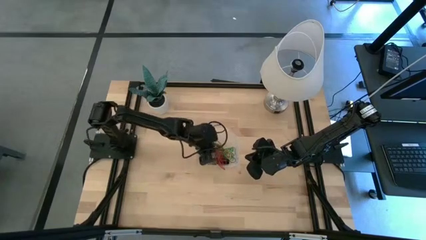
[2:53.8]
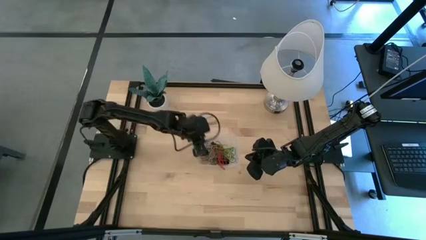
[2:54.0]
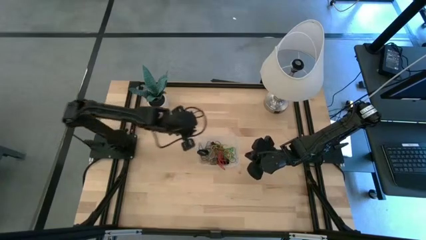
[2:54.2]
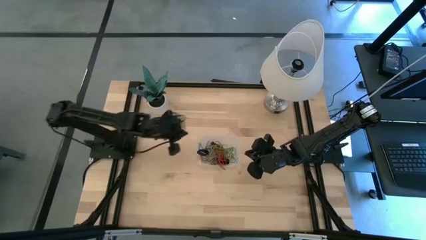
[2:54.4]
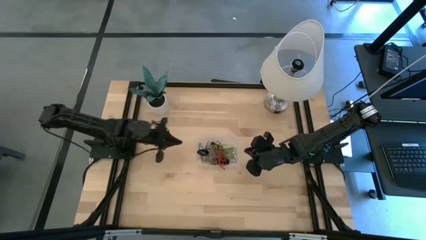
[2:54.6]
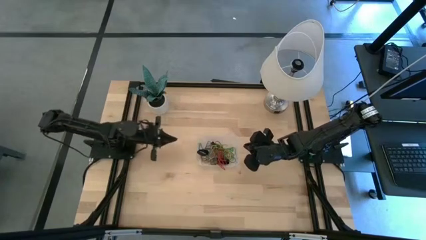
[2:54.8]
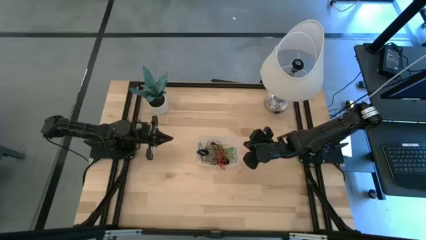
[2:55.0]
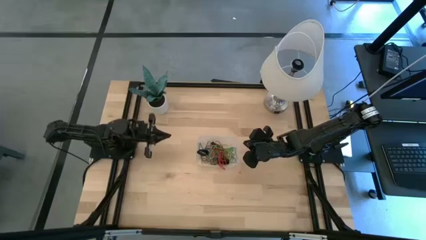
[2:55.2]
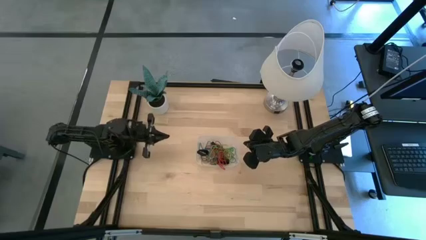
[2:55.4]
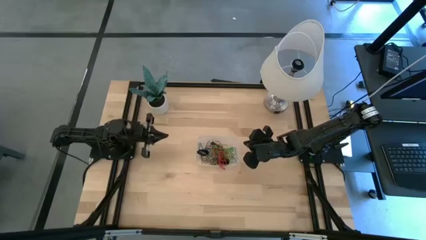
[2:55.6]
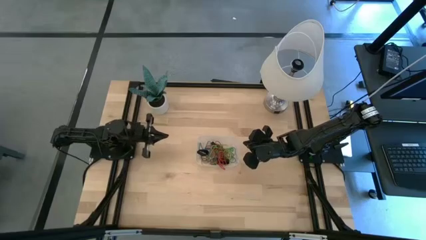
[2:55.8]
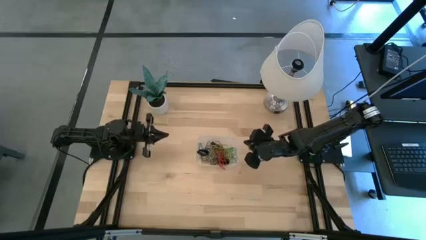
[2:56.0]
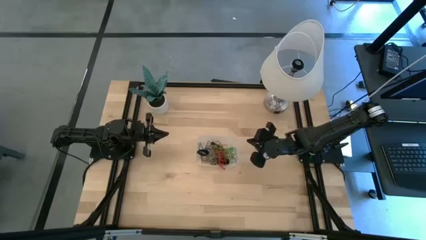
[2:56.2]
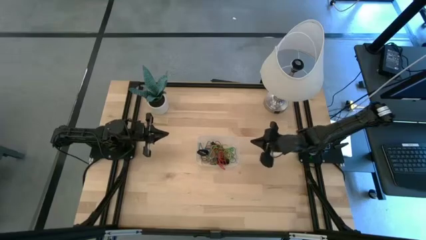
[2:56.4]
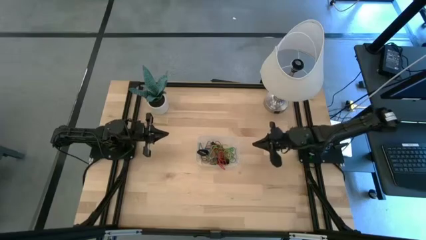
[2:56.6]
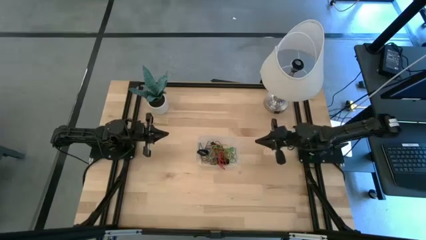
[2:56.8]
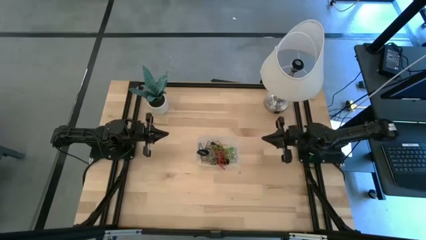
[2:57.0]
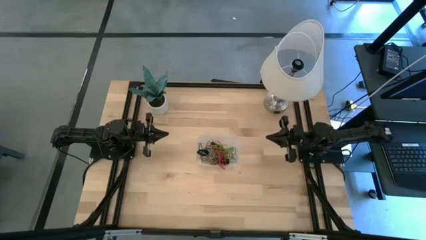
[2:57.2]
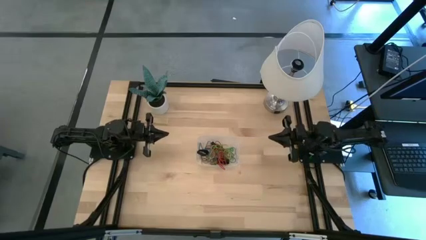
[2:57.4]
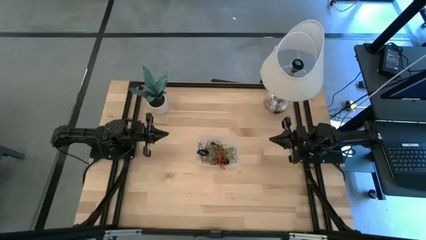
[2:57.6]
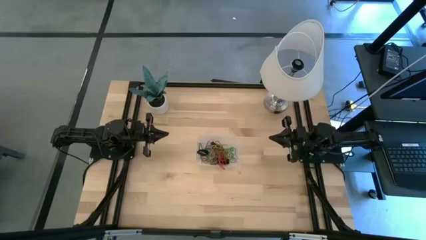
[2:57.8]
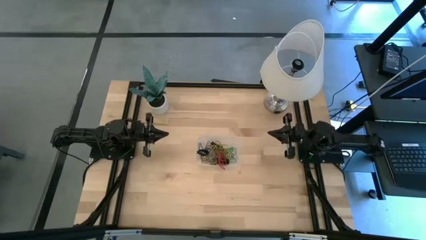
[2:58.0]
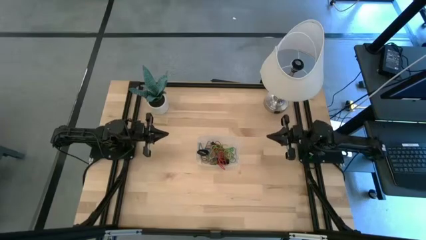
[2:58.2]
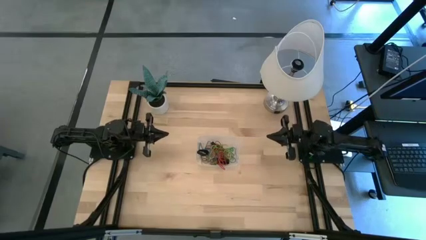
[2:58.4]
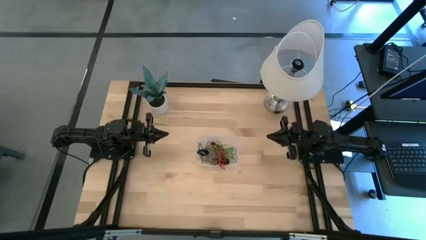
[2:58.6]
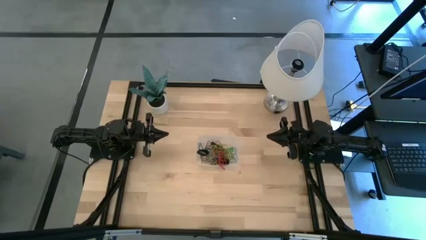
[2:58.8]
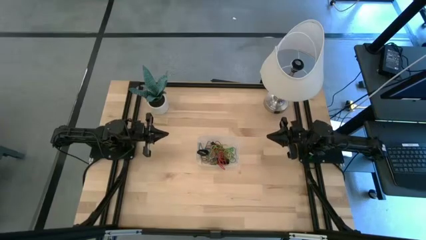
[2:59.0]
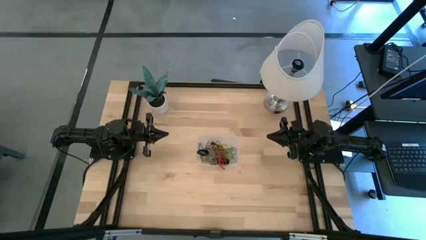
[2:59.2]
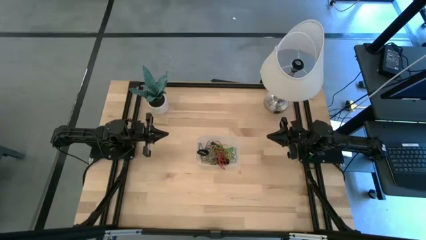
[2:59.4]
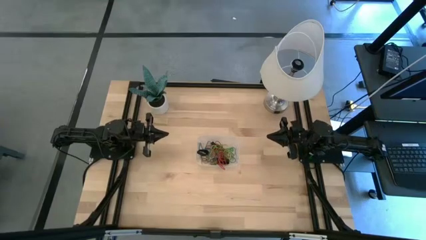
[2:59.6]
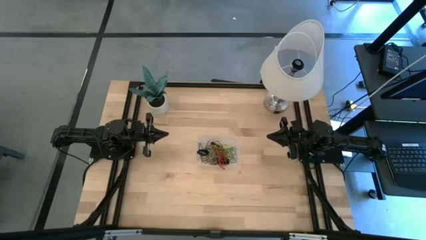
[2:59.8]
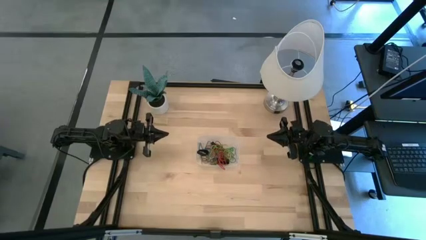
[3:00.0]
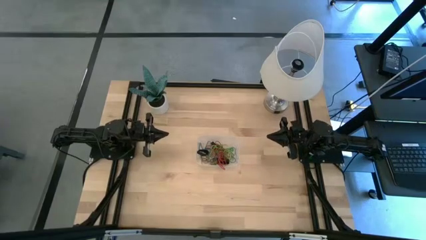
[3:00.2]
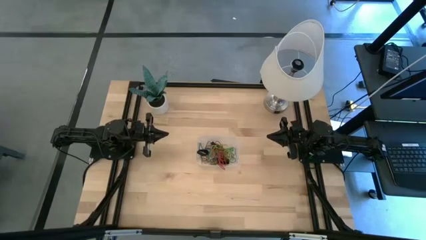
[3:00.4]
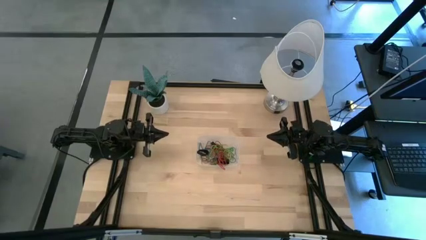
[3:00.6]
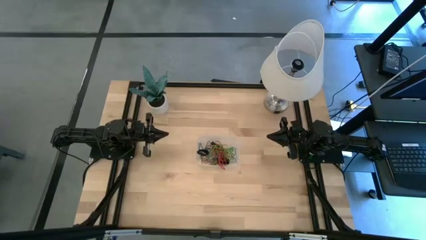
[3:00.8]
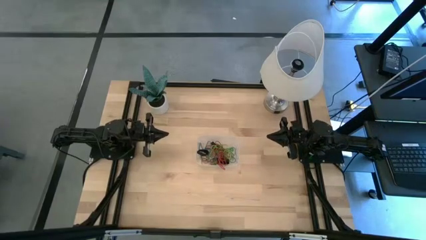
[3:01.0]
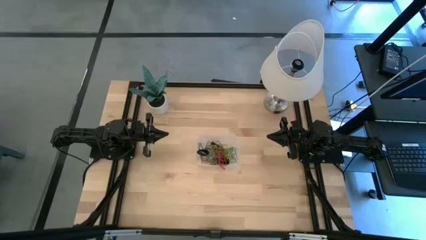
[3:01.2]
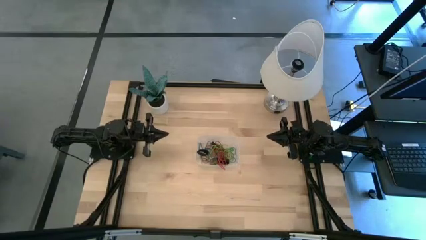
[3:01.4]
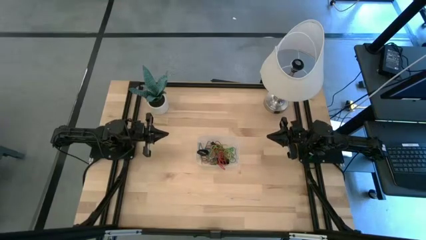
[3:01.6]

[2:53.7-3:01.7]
Task: Pick and place rubber bands into bin
Return to Home Position

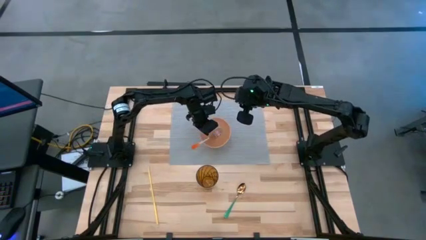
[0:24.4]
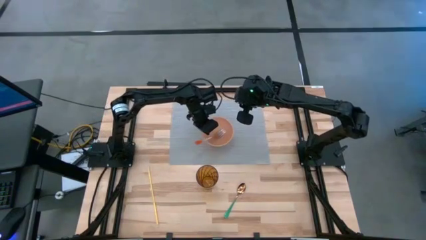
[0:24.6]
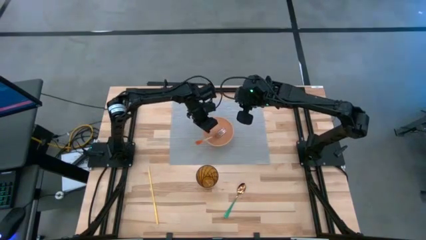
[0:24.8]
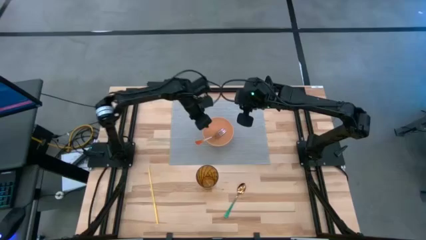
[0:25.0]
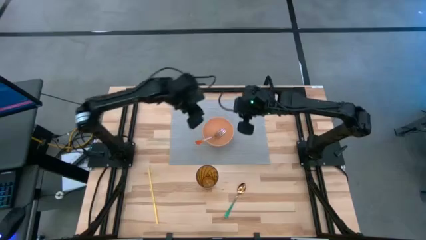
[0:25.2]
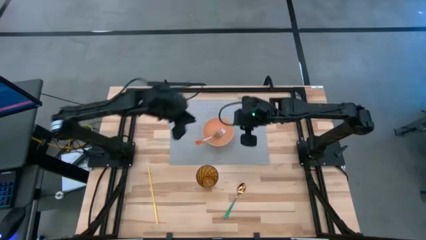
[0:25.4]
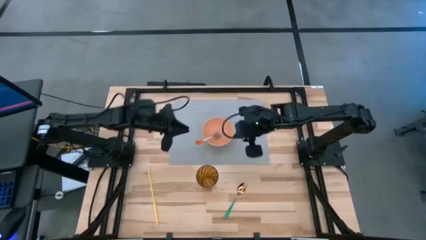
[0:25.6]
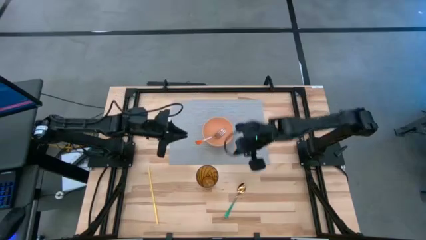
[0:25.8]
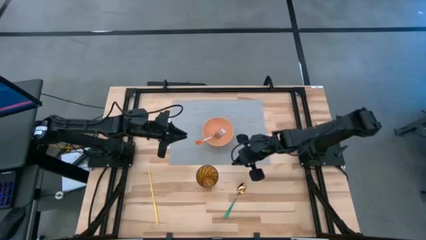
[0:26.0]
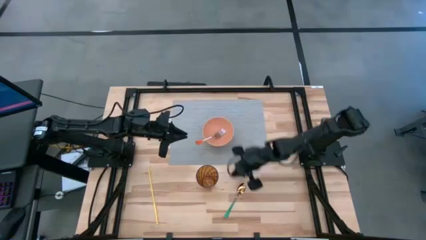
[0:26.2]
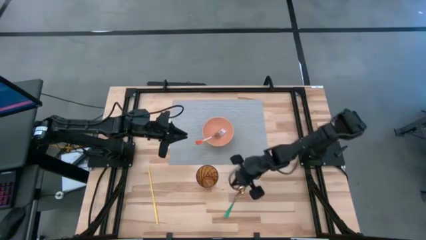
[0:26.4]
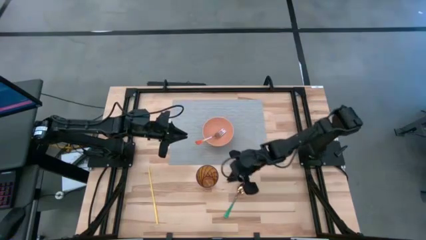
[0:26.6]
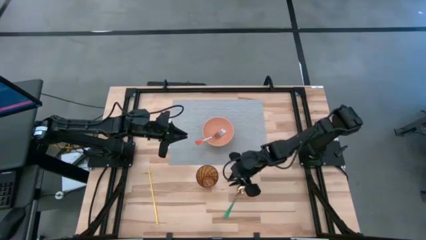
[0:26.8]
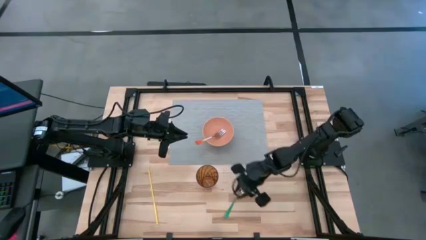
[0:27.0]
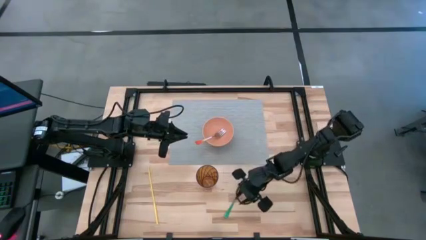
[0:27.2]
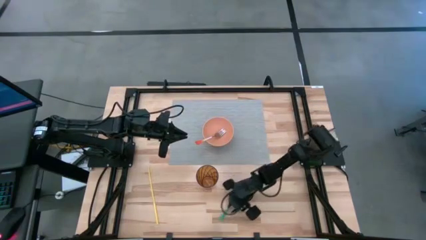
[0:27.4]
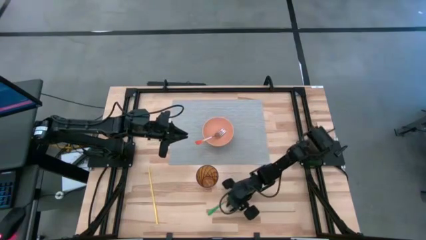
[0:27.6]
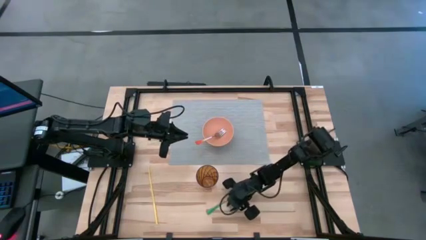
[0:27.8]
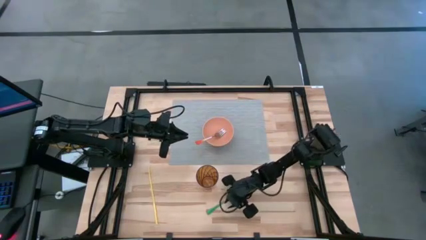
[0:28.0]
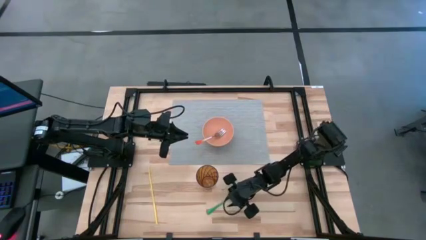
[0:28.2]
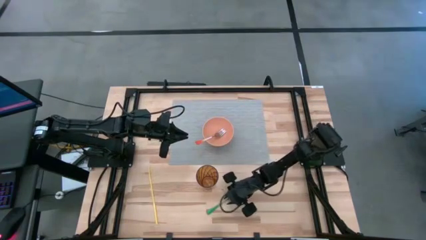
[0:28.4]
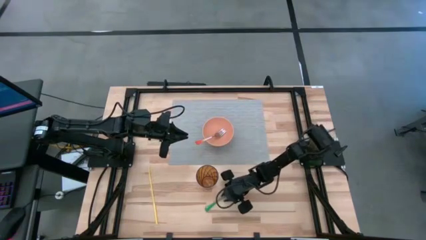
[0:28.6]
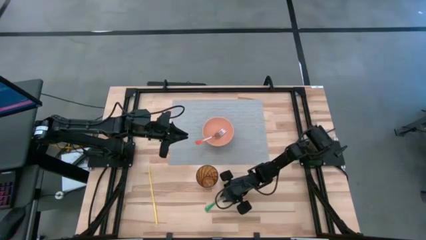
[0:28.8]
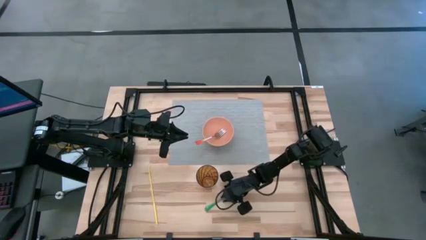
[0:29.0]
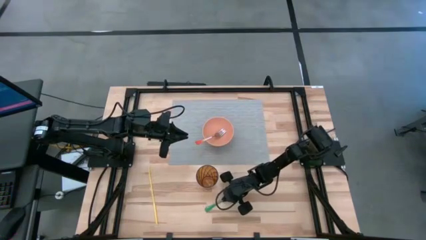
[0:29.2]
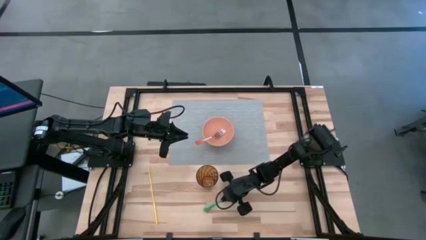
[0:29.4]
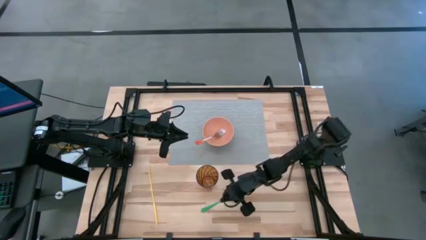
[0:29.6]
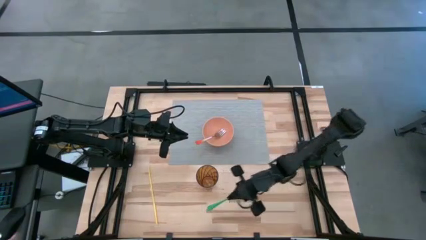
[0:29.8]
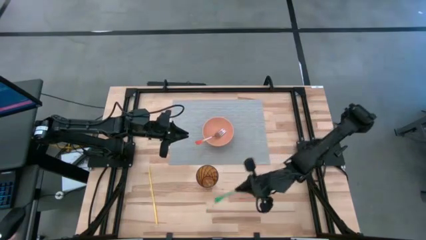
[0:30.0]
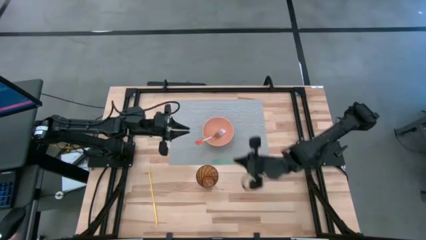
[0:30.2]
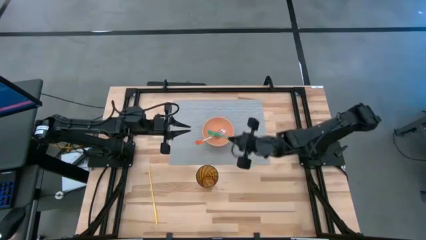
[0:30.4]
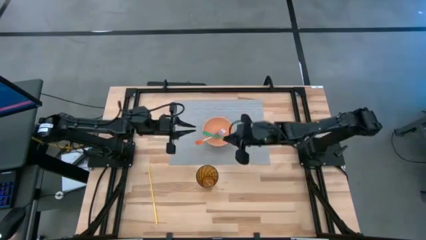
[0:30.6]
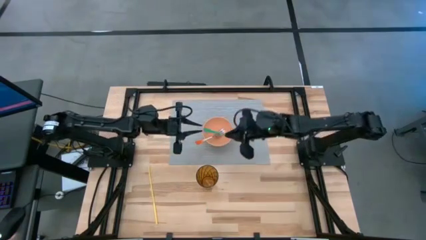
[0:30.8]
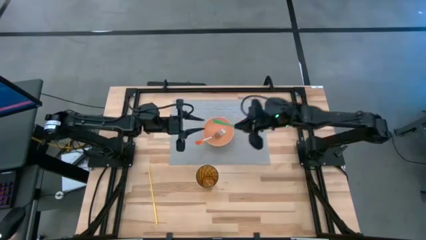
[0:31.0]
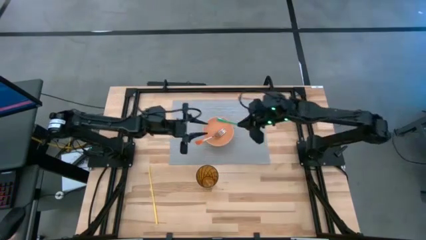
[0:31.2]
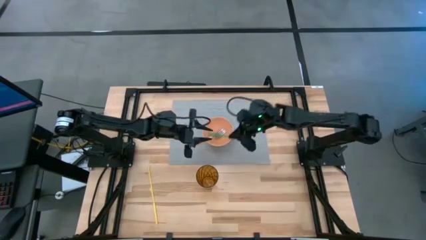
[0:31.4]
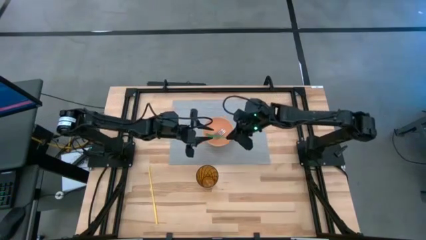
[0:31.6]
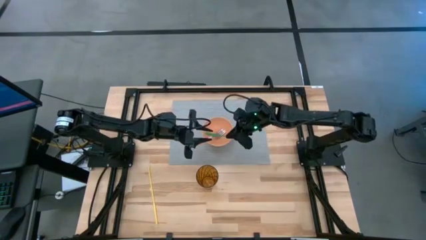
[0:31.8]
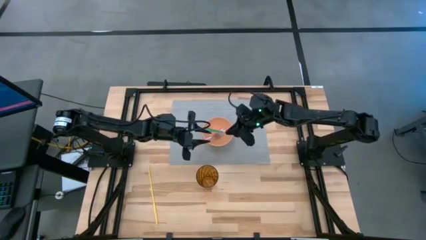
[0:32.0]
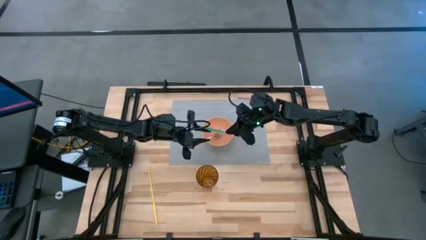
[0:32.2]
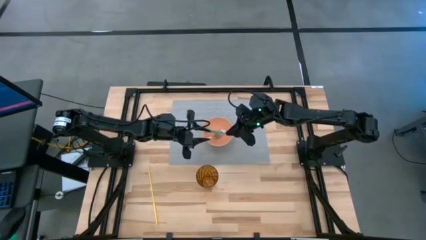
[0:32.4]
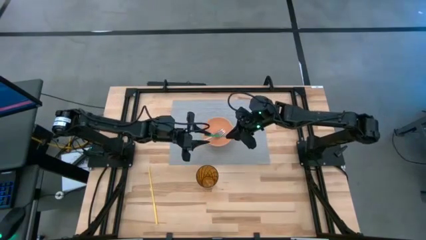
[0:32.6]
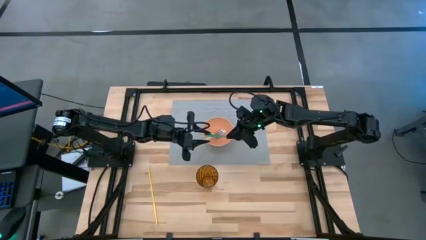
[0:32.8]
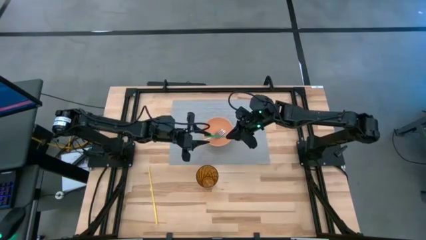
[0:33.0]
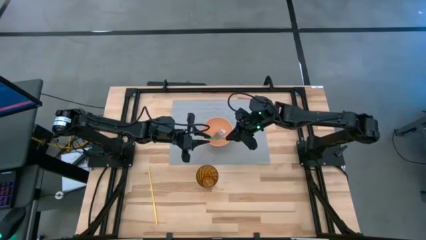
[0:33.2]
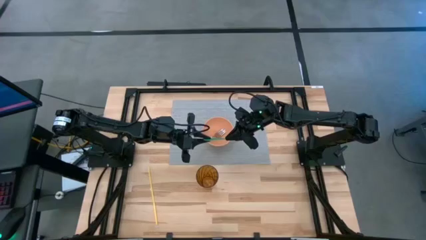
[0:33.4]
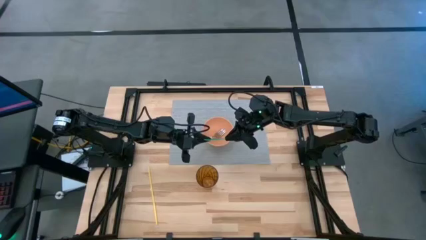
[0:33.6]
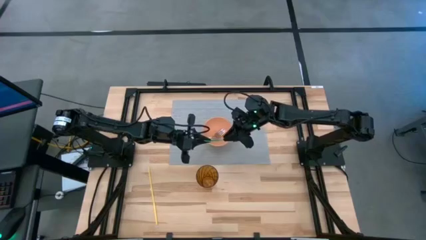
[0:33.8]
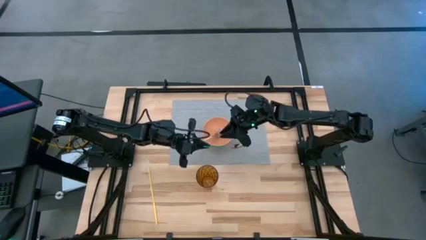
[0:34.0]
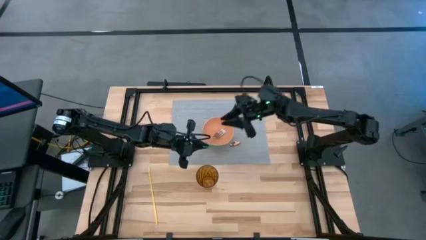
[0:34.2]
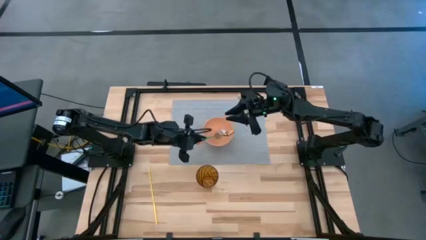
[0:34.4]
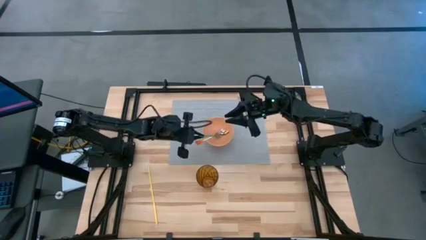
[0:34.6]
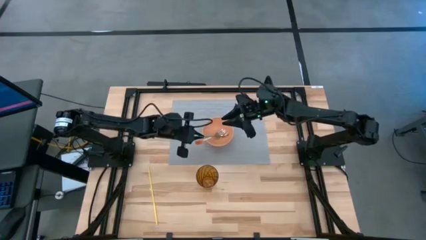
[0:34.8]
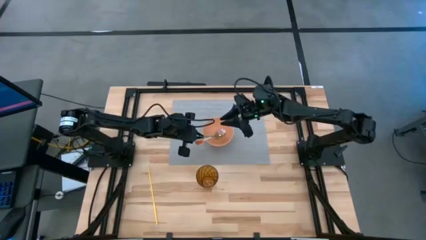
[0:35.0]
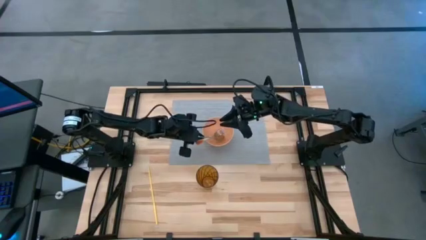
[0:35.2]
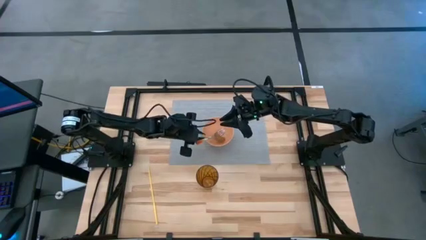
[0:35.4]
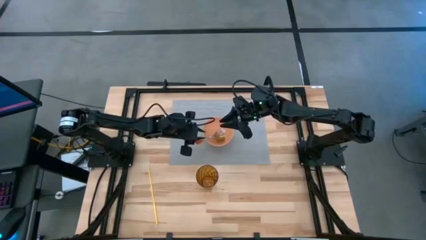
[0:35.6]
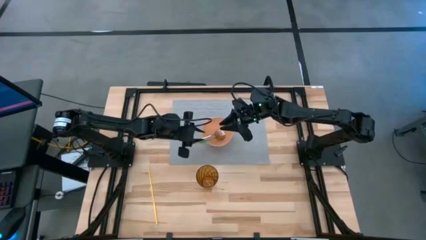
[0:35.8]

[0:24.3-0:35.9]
Task: Pick & Place Utensil
Put the green spoon into the light orange bowl
